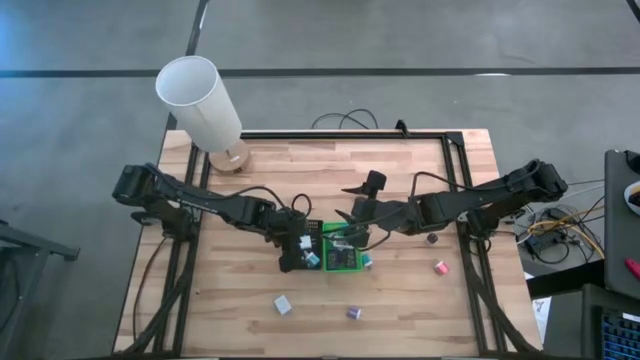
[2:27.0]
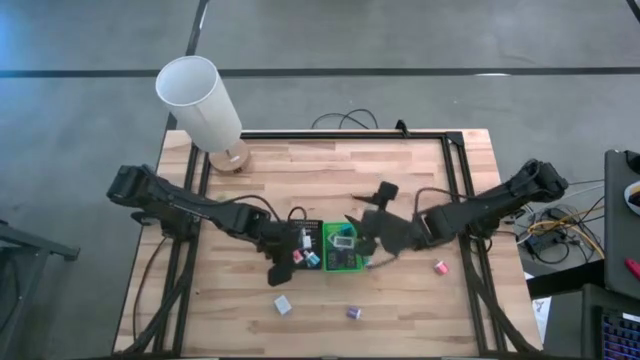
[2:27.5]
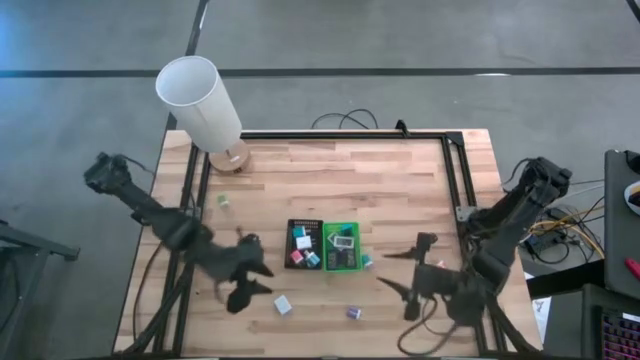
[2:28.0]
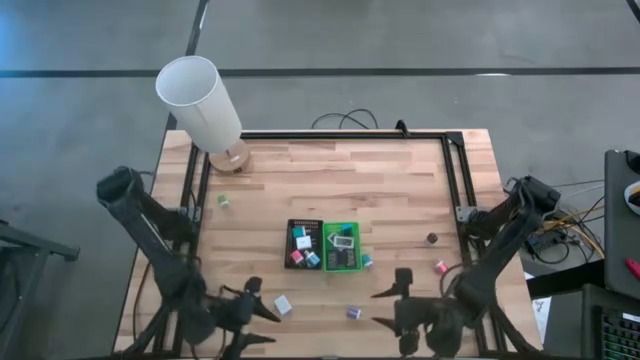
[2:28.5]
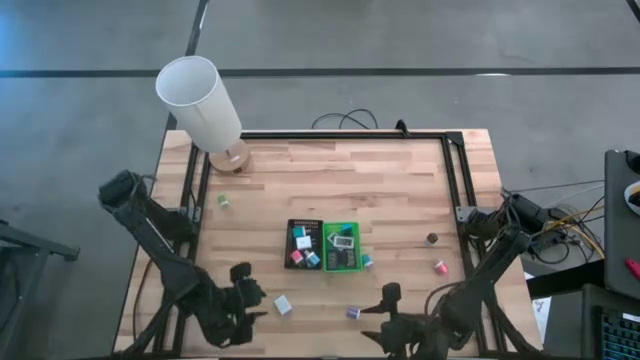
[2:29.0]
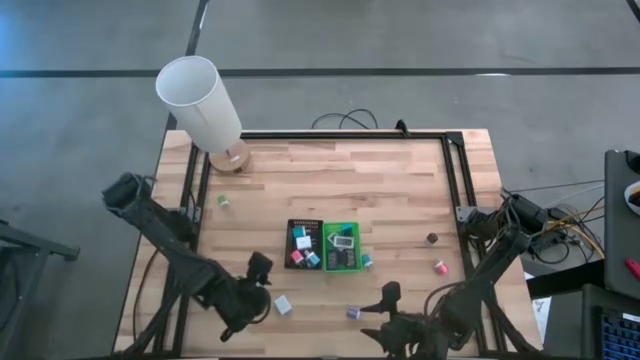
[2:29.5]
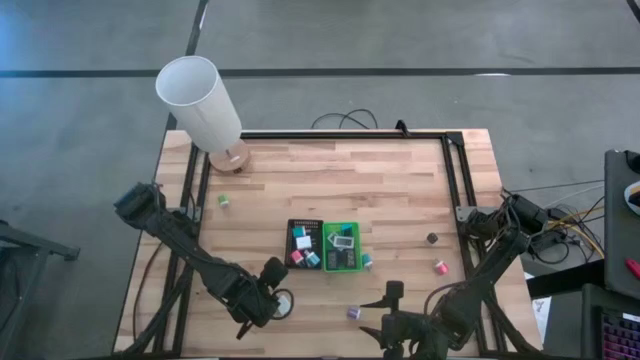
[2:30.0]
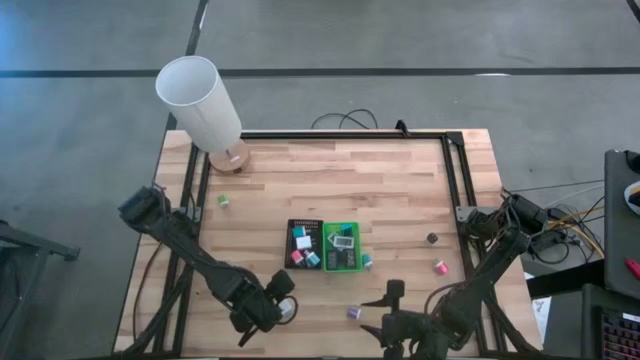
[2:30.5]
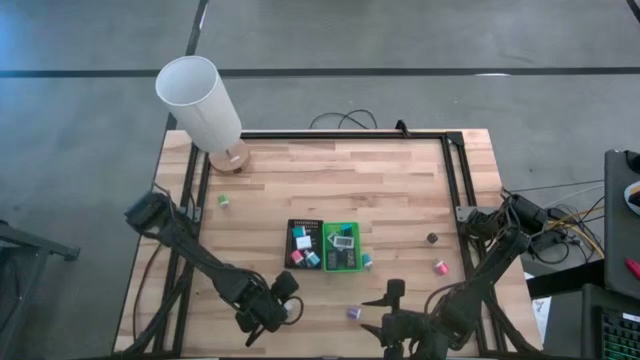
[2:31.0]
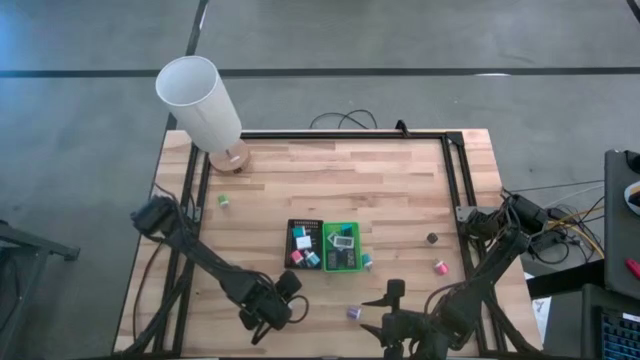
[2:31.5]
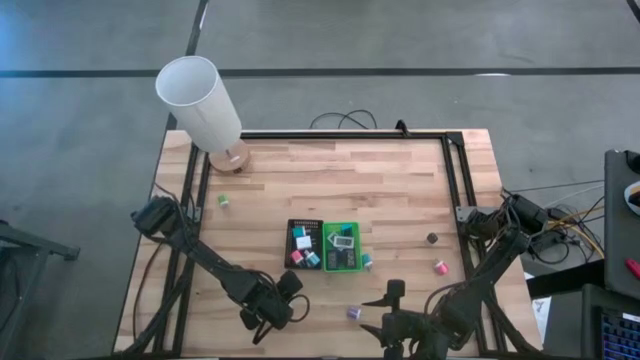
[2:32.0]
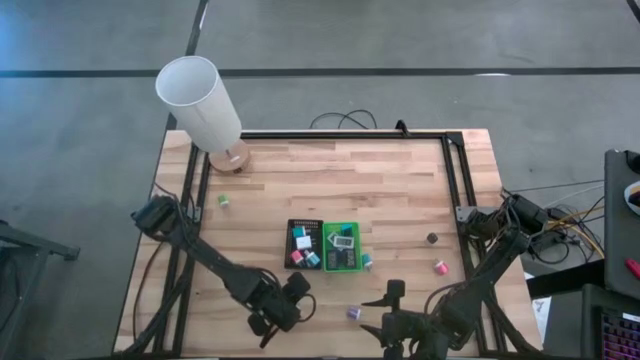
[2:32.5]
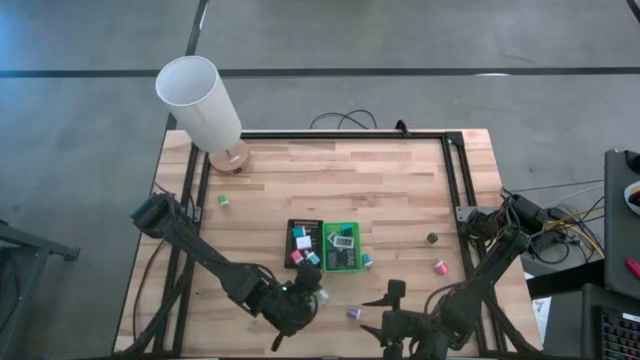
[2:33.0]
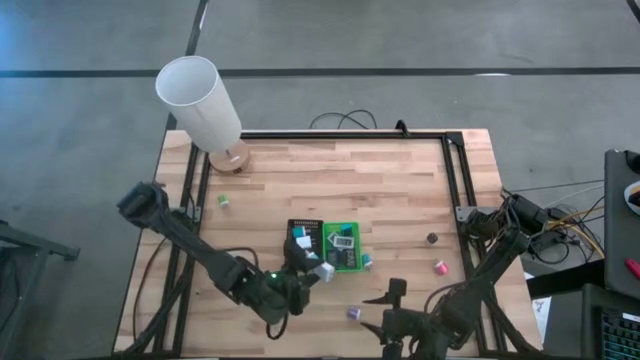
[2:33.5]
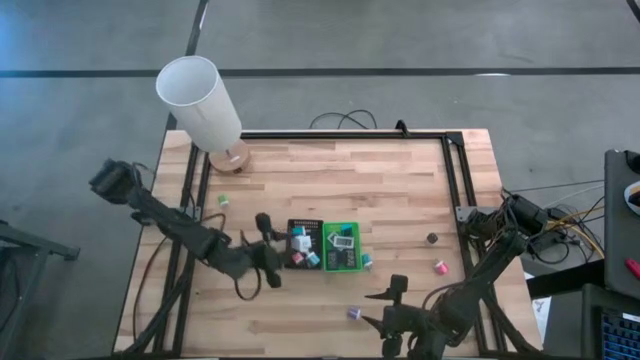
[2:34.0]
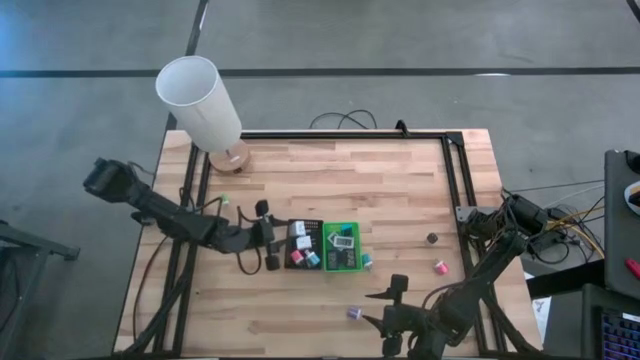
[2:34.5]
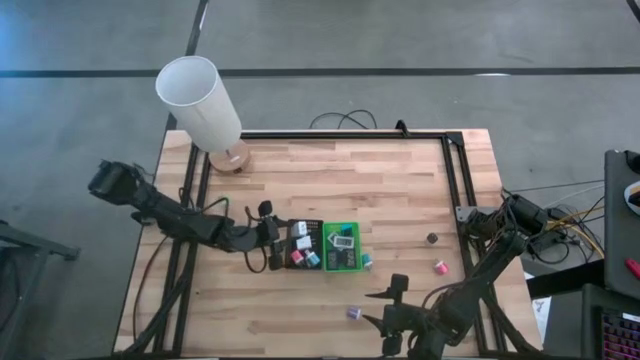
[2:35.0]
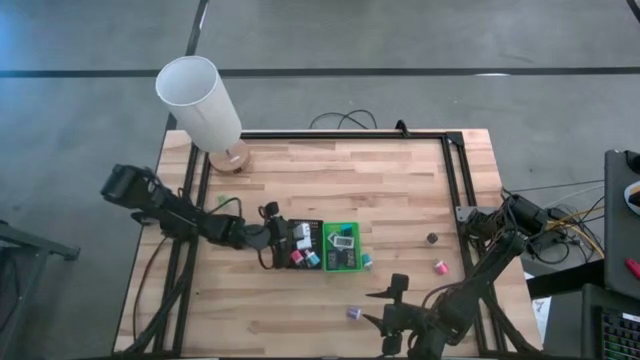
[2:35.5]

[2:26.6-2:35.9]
Task: Pick & Place Office items
Put the white charger adapter into the black bin

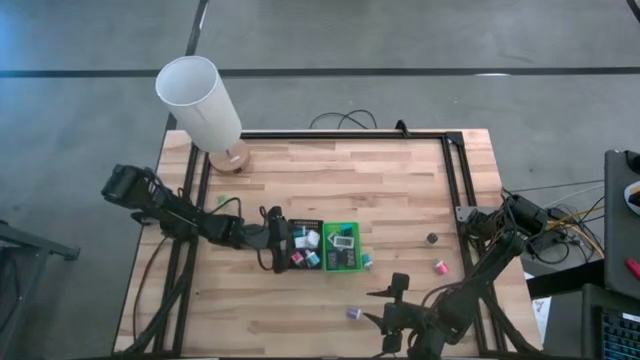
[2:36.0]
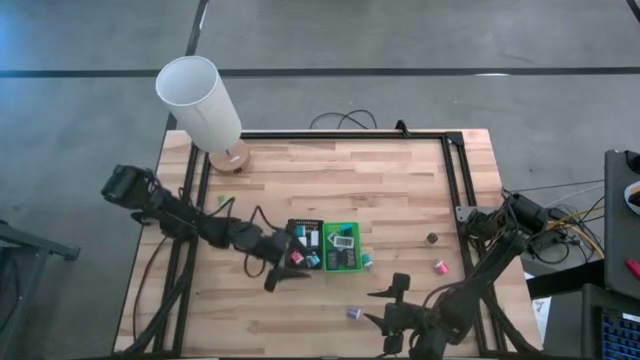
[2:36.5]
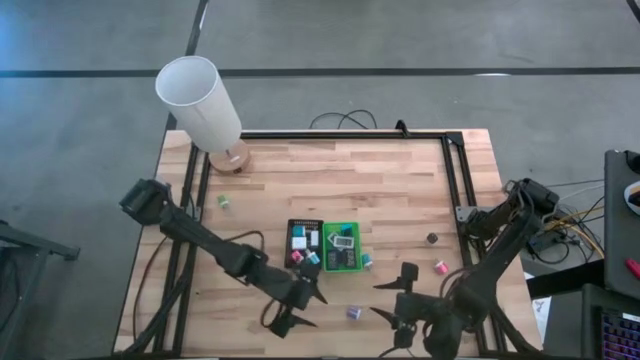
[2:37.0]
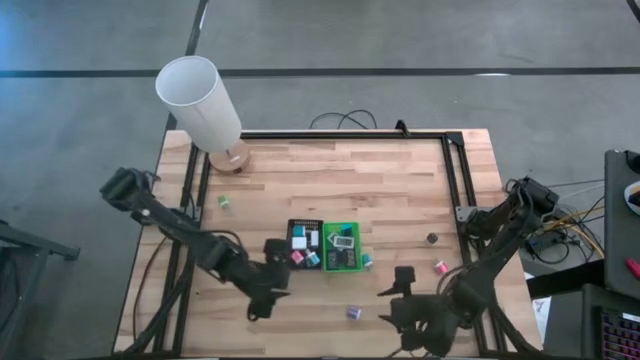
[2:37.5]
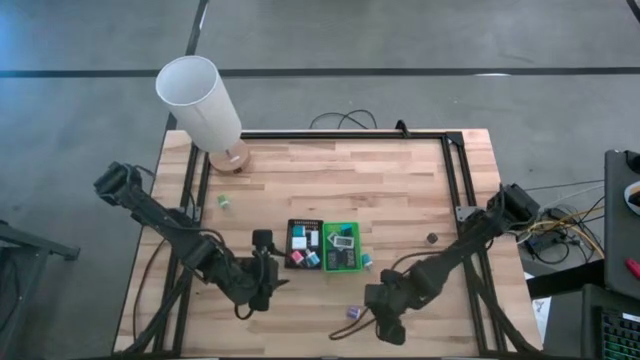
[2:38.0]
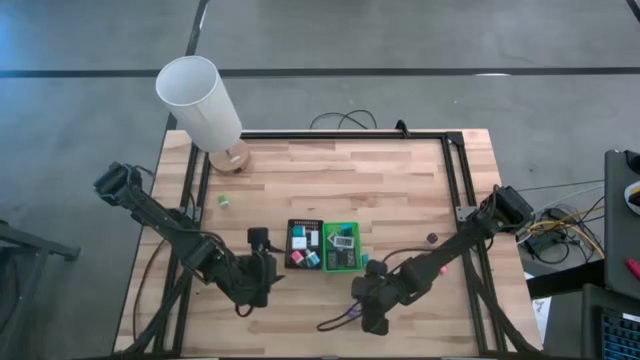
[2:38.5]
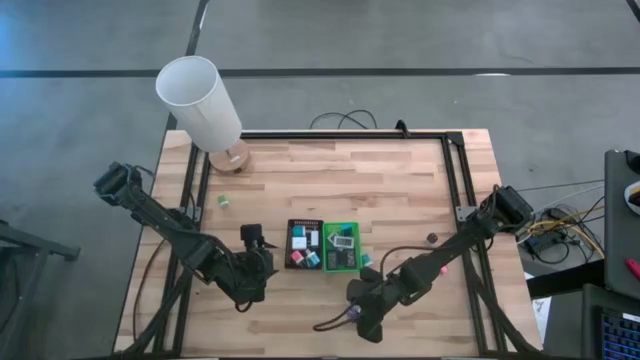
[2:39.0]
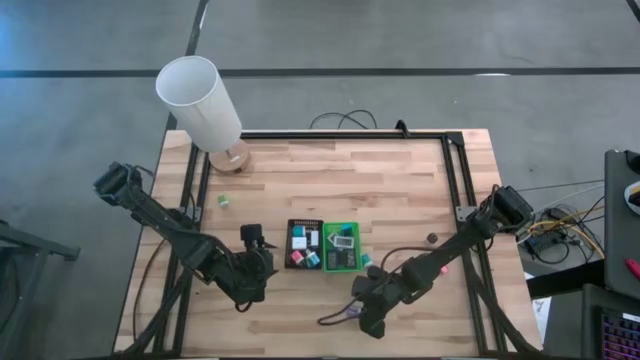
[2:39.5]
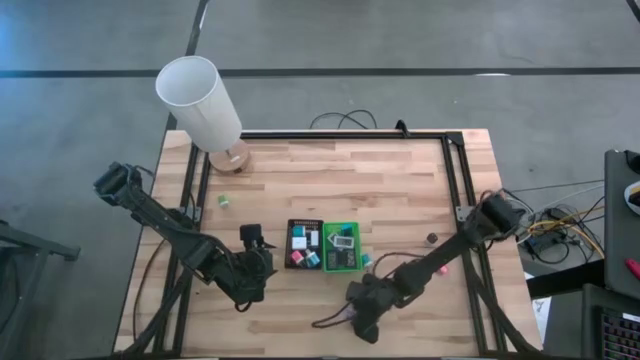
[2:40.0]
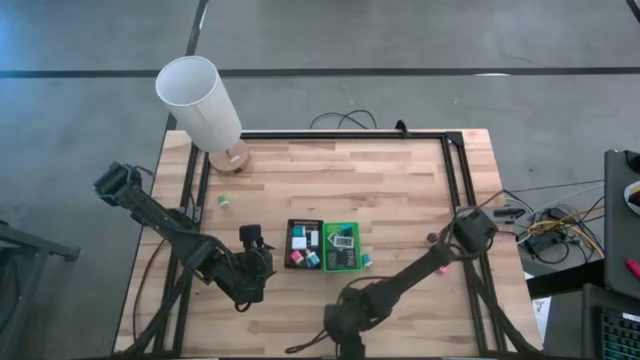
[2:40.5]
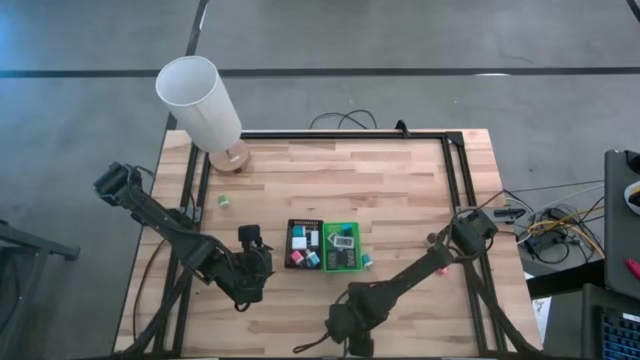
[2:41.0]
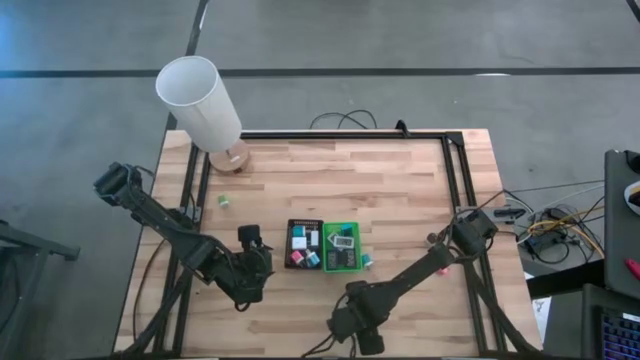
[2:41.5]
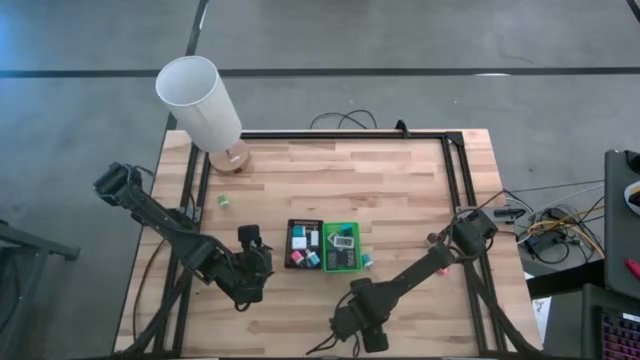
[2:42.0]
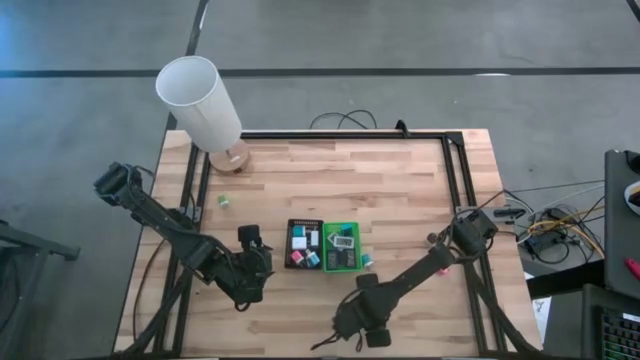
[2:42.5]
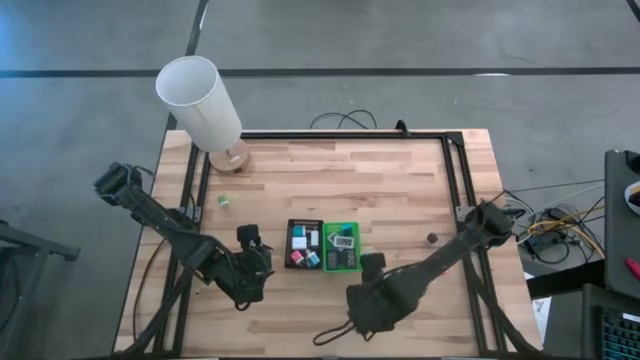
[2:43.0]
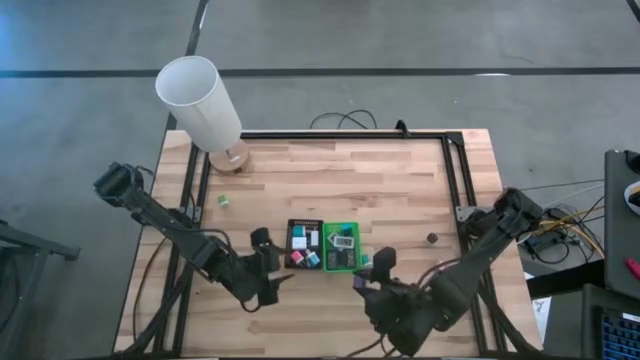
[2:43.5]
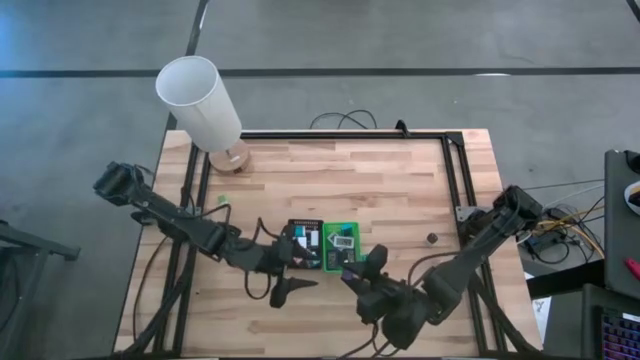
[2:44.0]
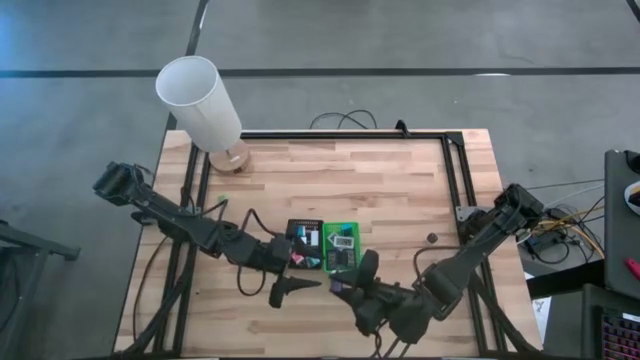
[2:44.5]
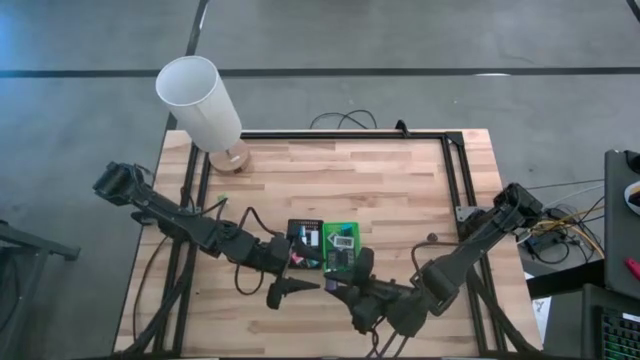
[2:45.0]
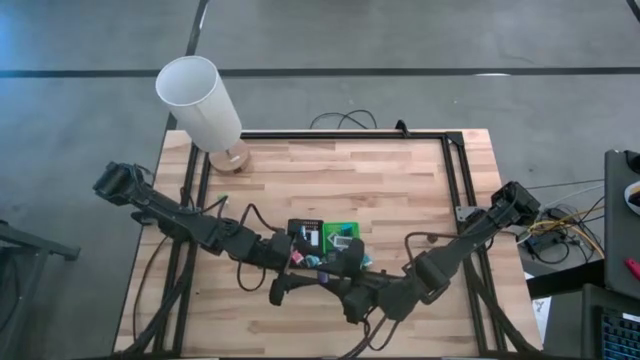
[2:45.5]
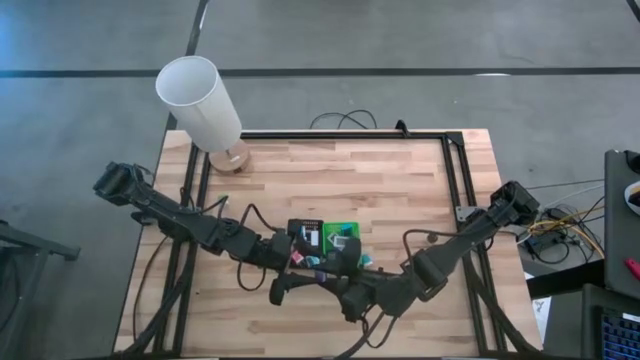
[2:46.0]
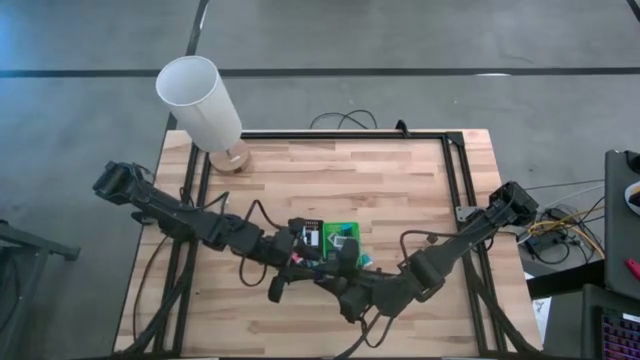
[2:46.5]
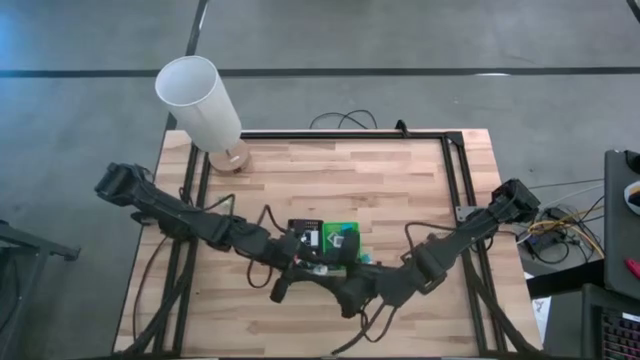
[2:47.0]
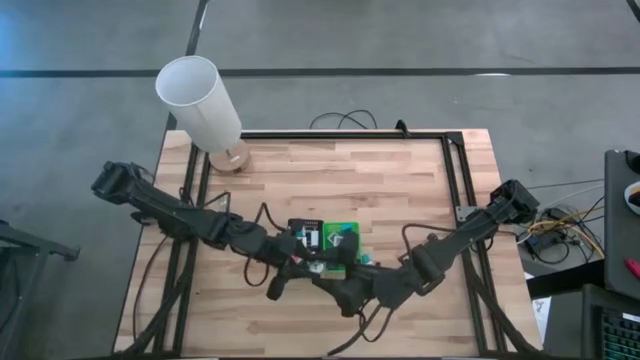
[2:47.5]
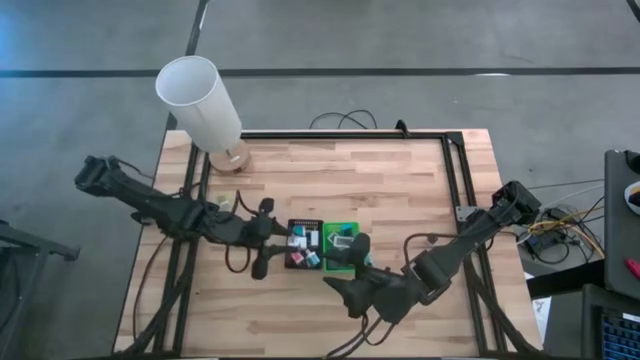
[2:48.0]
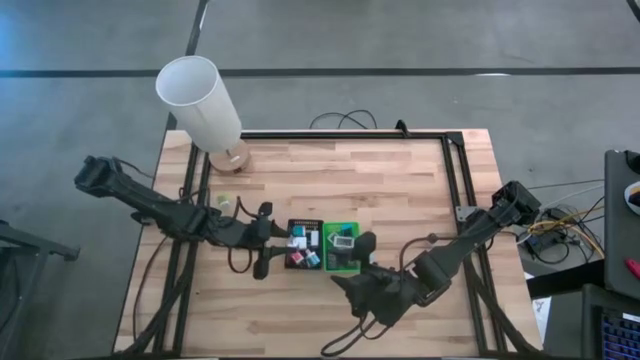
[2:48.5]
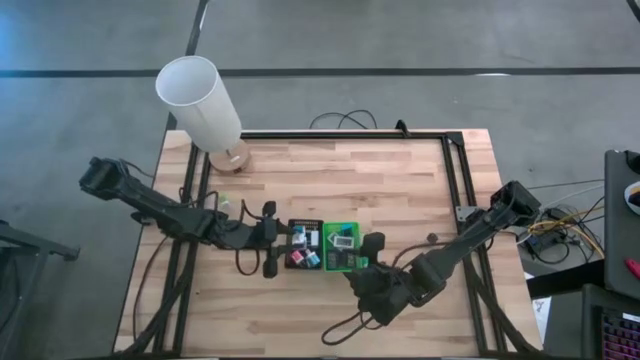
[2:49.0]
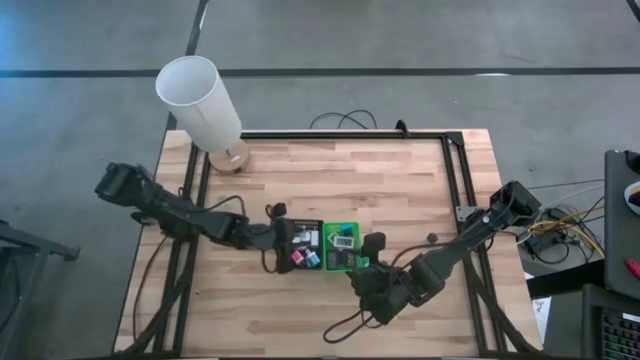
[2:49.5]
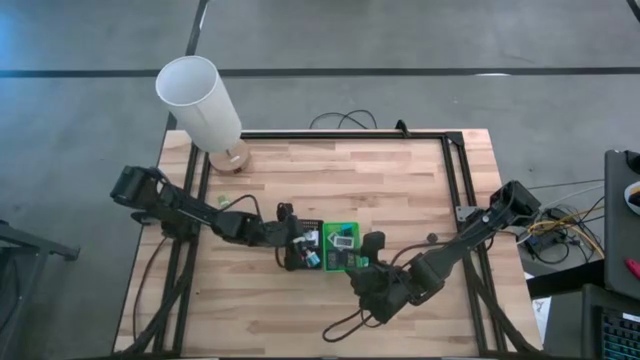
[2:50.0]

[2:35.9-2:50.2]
Put the dark blue white charger adapter into the black bin
